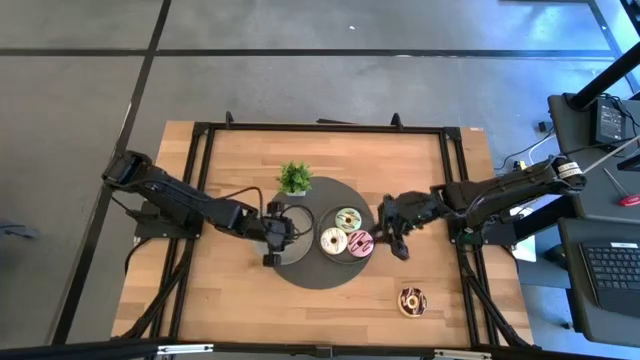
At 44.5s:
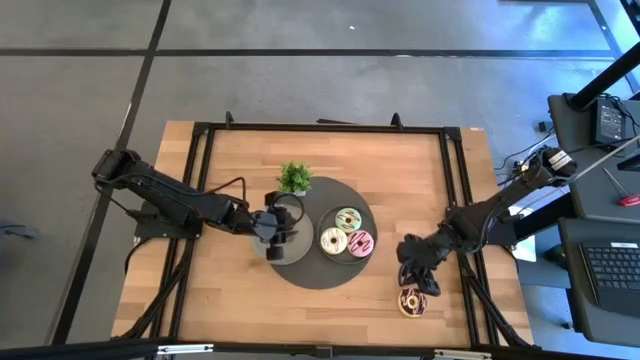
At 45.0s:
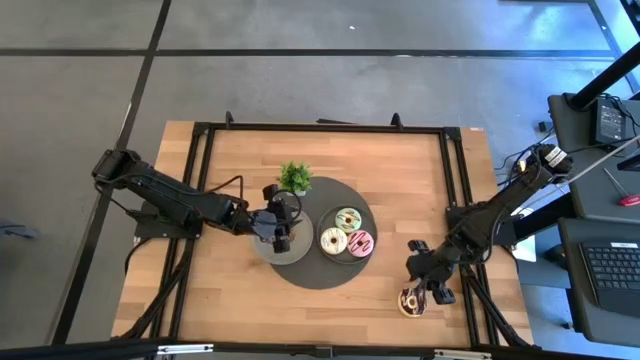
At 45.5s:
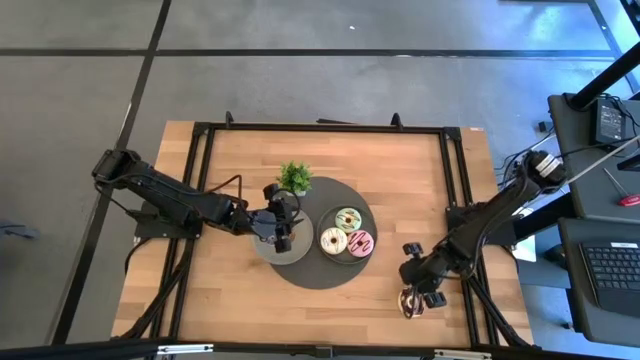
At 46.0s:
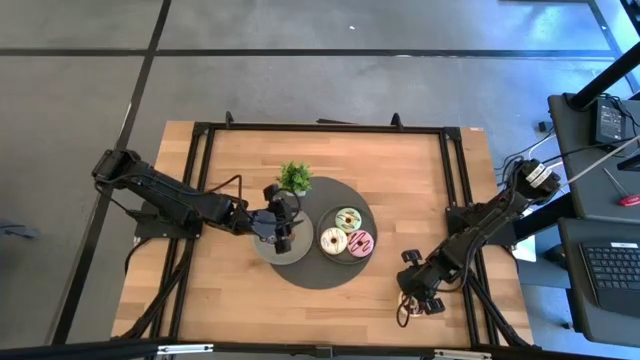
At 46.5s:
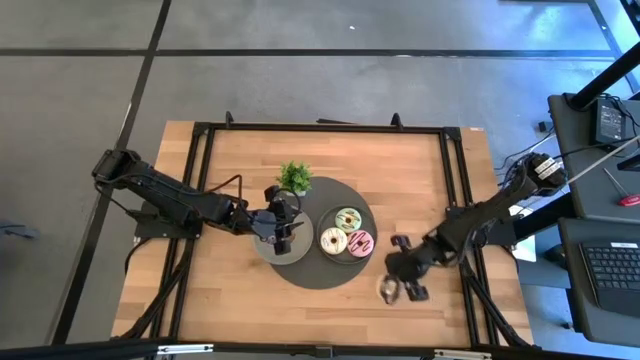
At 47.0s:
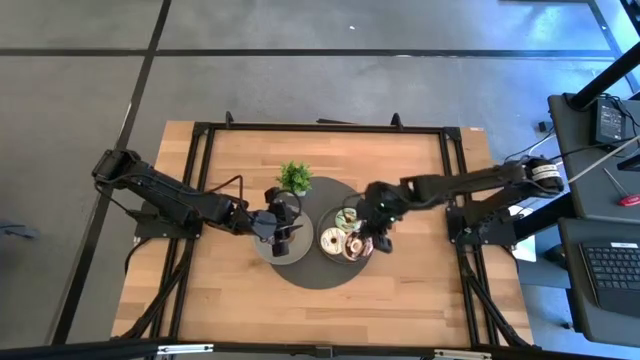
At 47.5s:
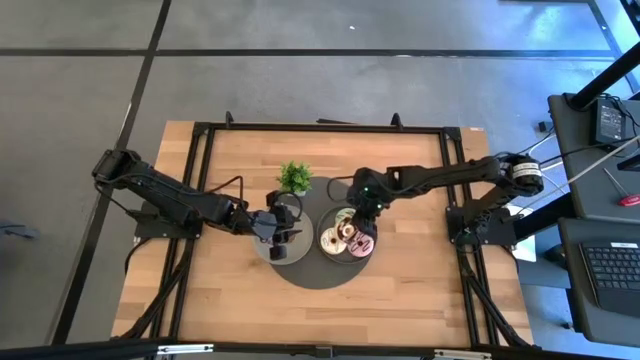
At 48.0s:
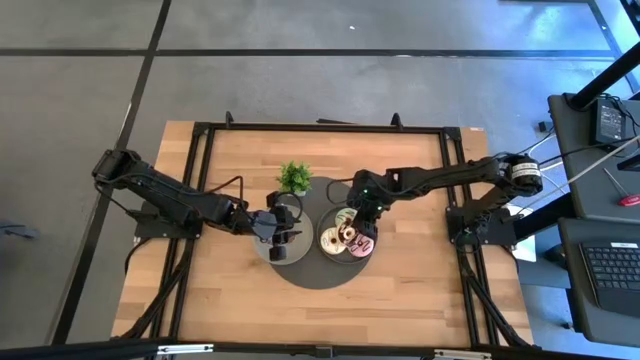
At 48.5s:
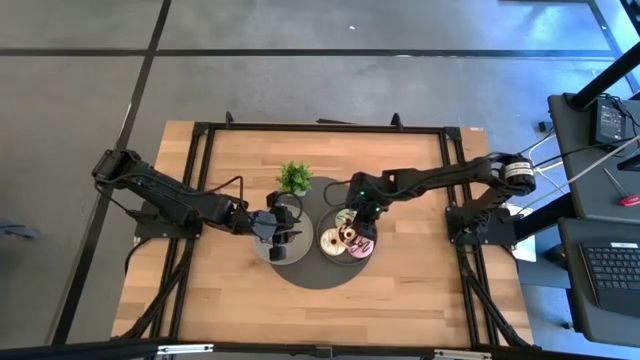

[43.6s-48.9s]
Task: Pick & Place donuts
Put the large black donut on the black plate

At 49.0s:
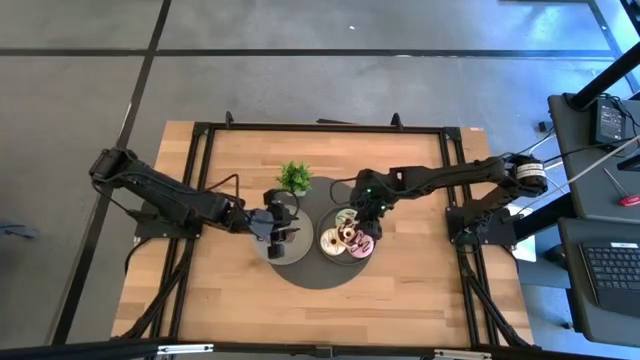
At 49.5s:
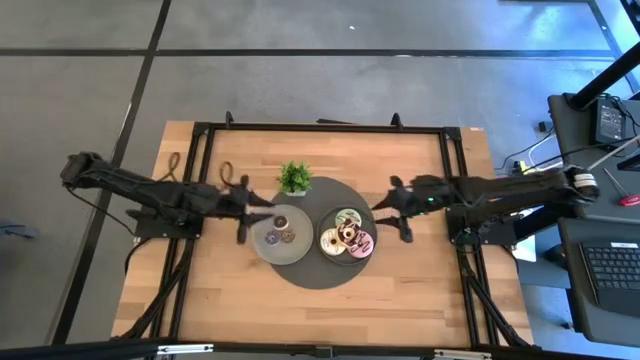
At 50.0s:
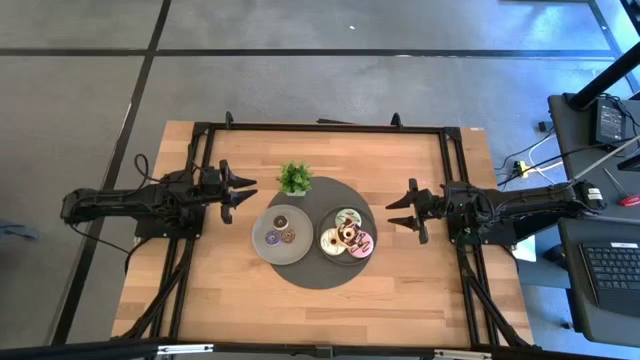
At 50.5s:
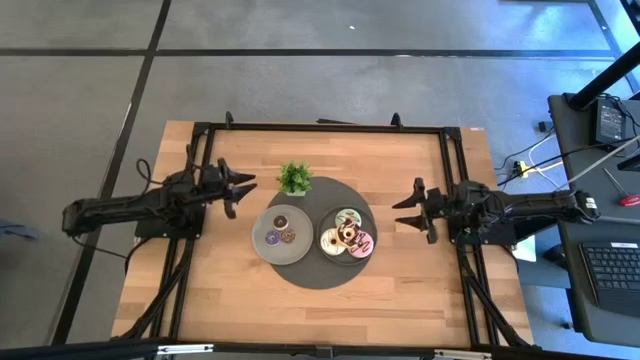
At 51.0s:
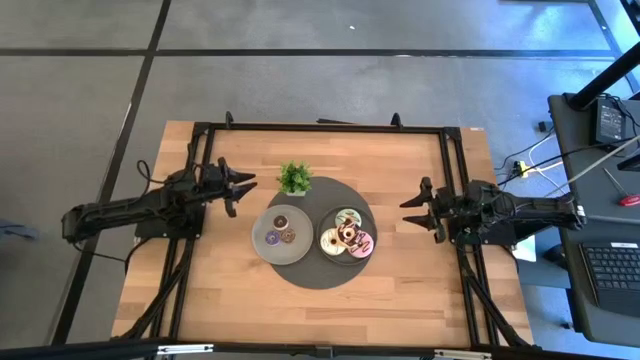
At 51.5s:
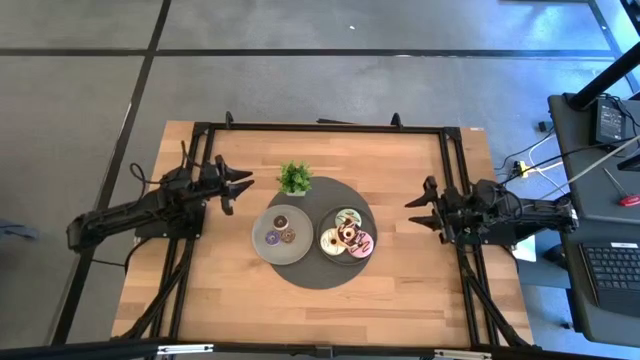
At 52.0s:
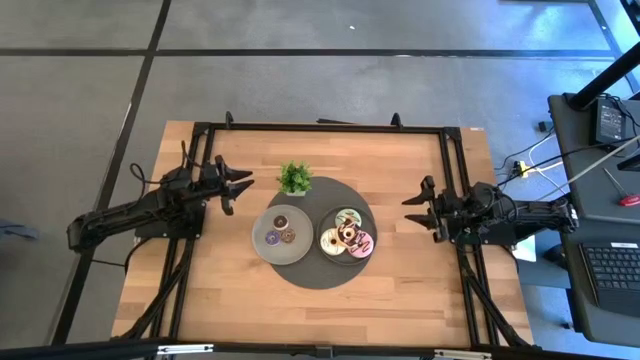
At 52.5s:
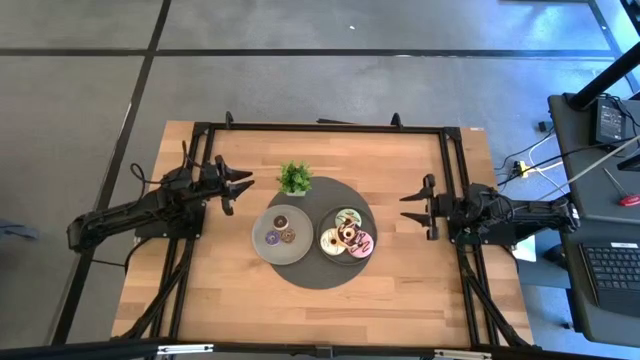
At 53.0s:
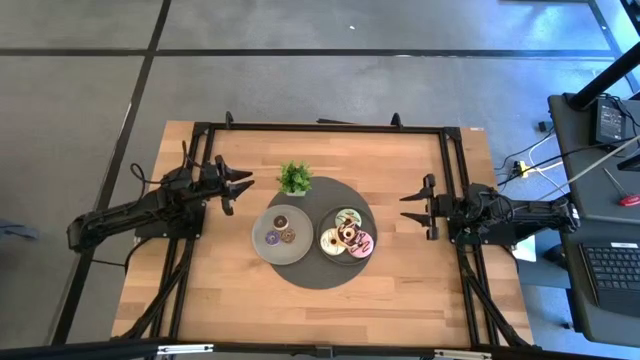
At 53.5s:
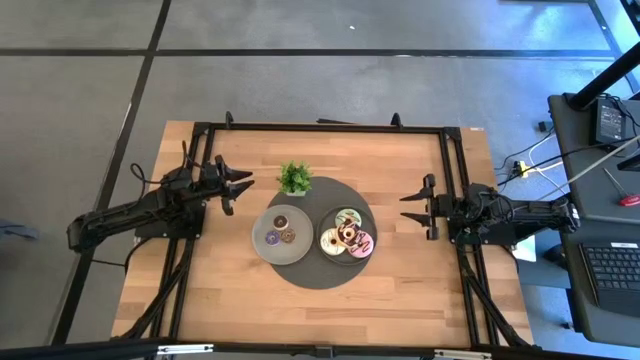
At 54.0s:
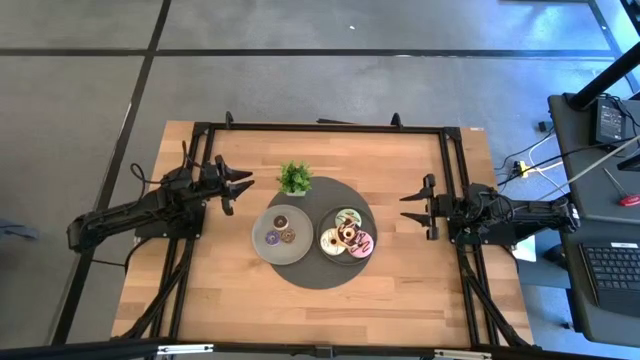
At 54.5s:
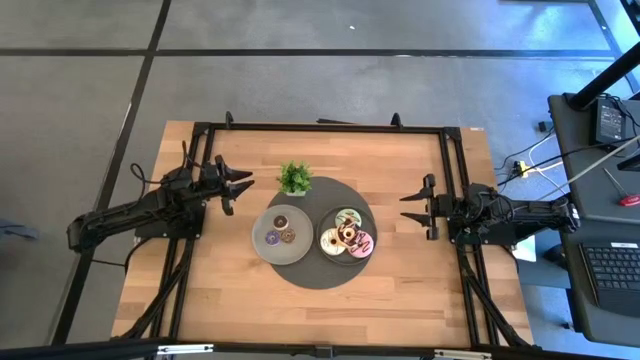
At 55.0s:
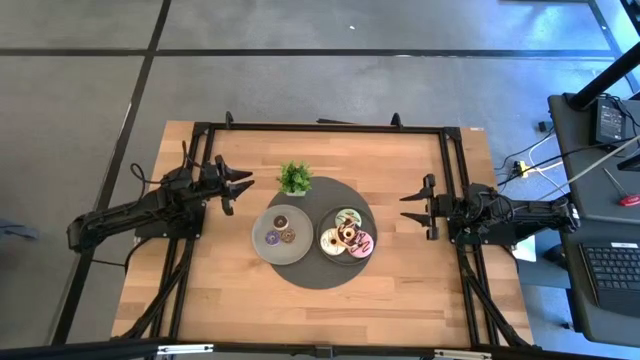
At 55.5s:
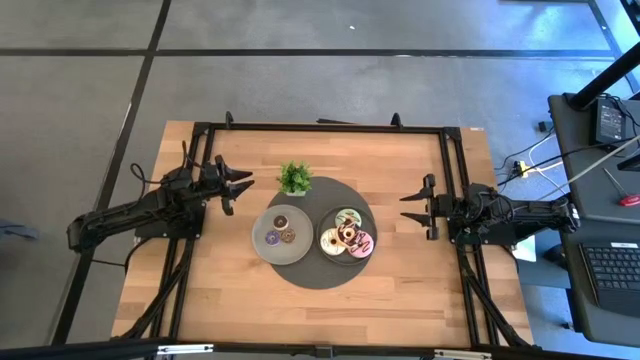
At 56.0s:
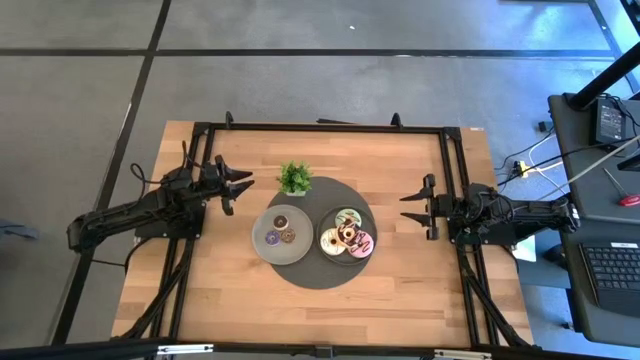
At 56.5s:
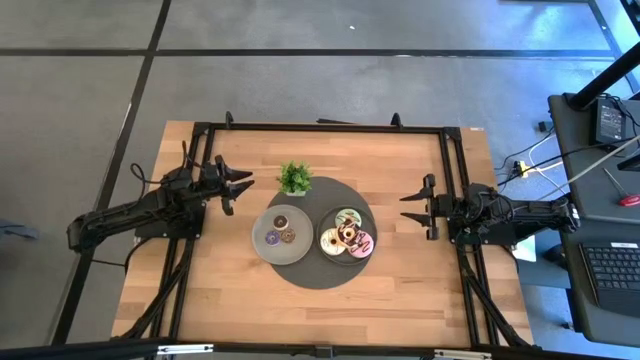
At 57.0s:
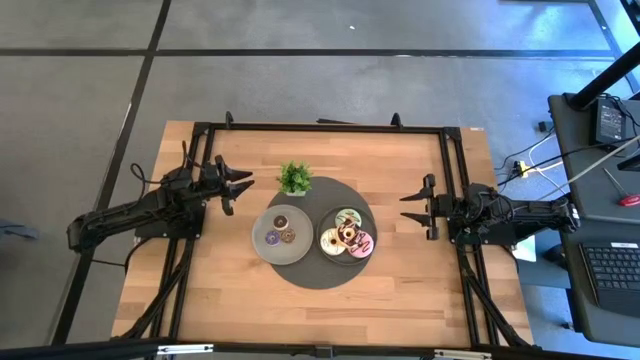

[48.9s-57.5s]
Return to Home Position

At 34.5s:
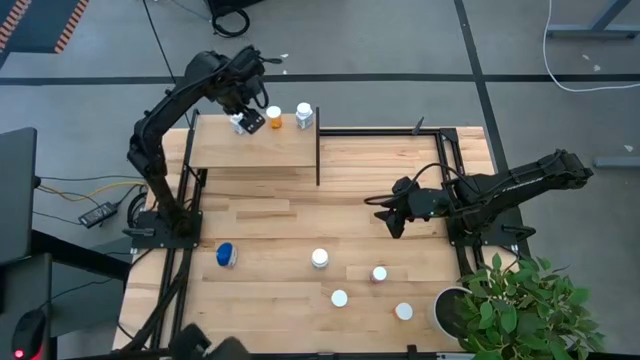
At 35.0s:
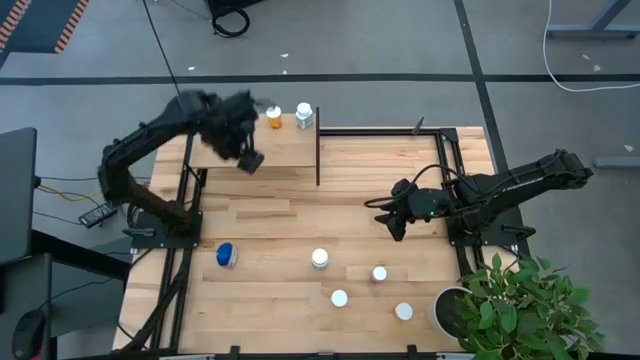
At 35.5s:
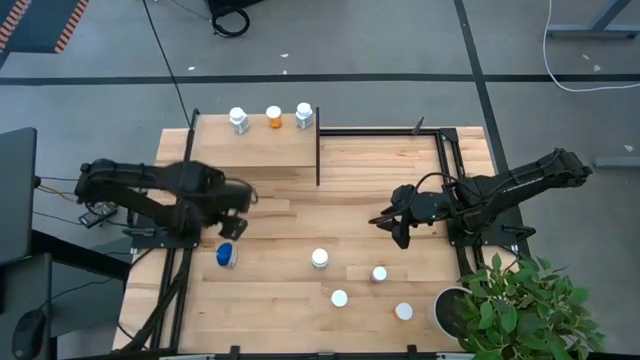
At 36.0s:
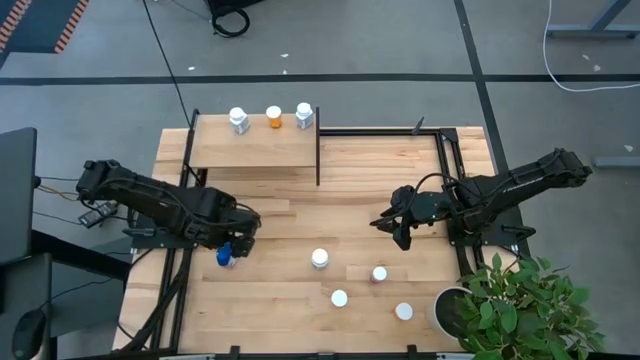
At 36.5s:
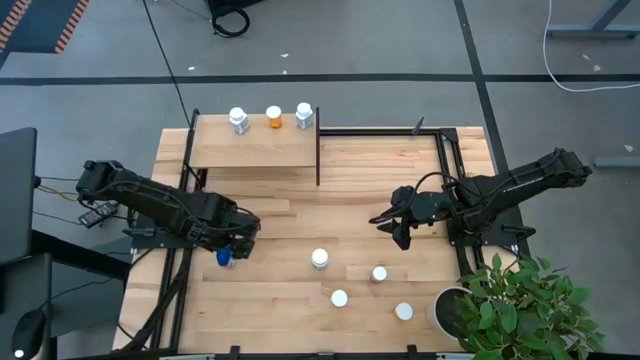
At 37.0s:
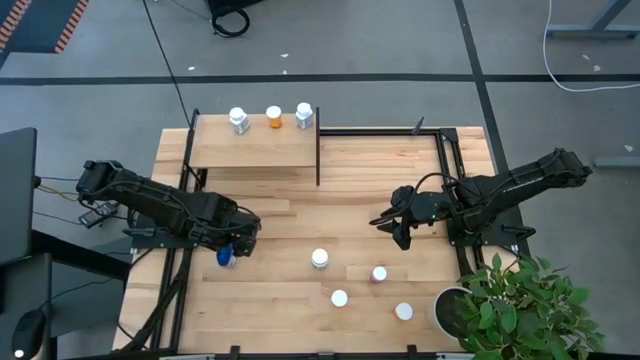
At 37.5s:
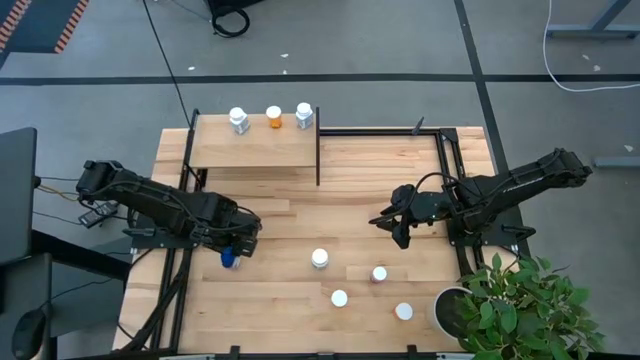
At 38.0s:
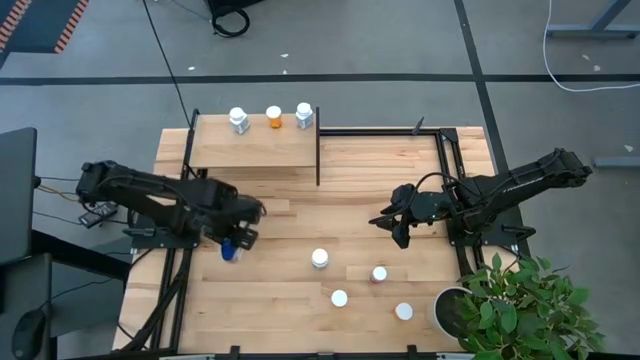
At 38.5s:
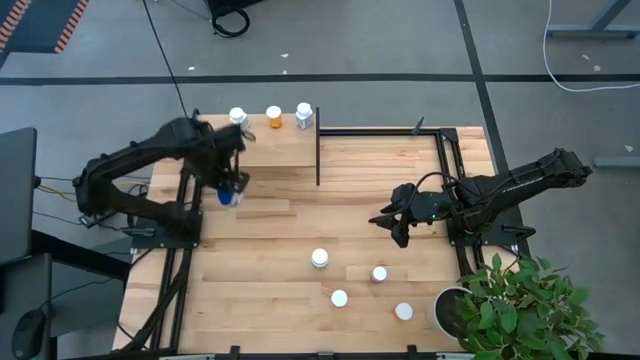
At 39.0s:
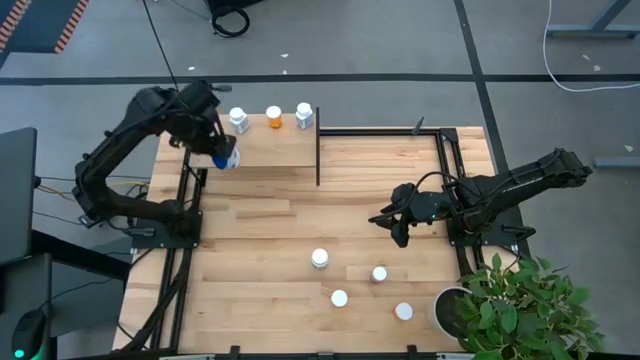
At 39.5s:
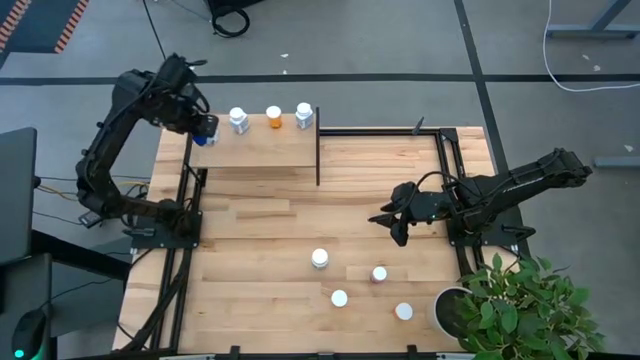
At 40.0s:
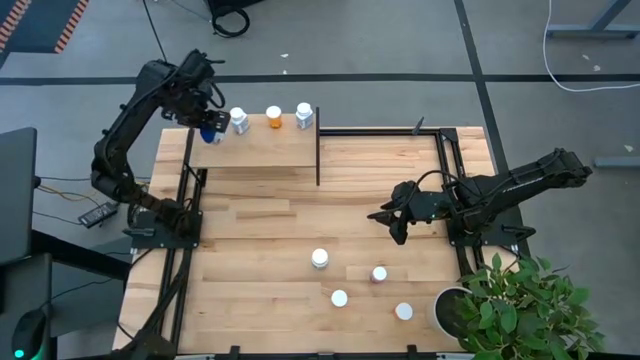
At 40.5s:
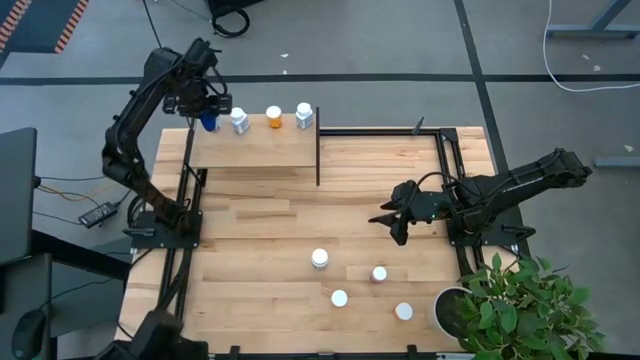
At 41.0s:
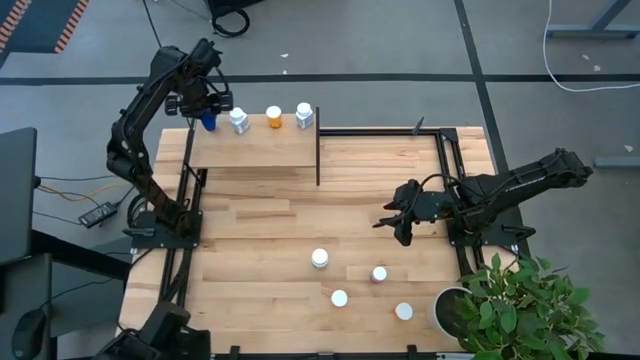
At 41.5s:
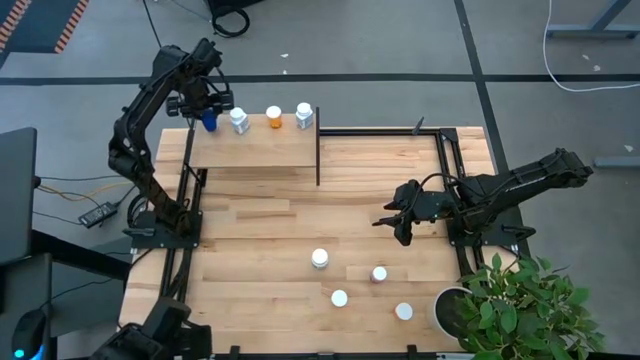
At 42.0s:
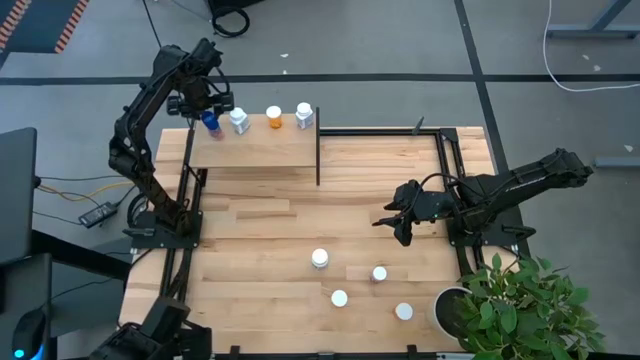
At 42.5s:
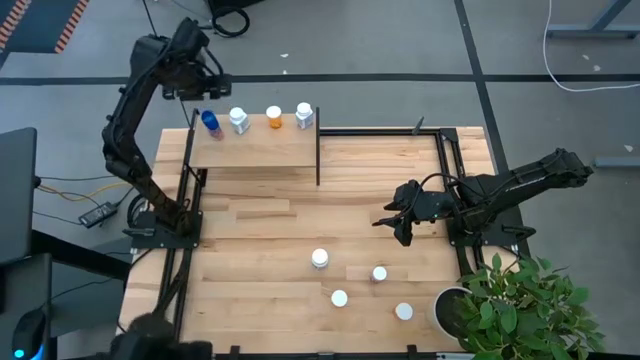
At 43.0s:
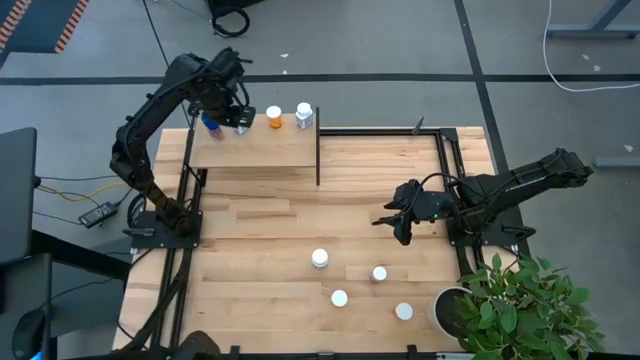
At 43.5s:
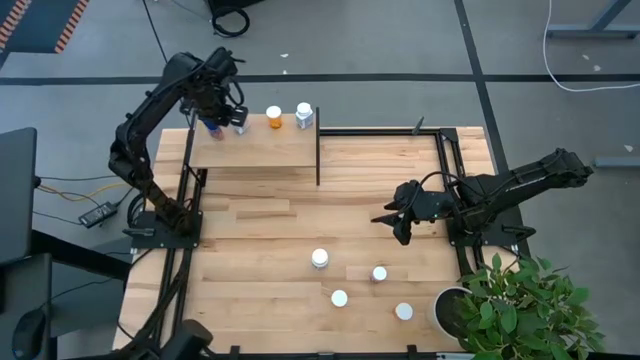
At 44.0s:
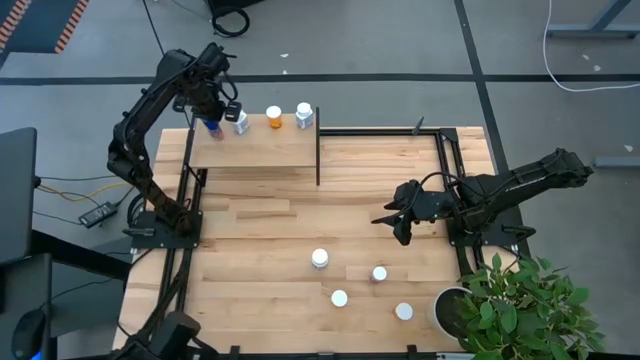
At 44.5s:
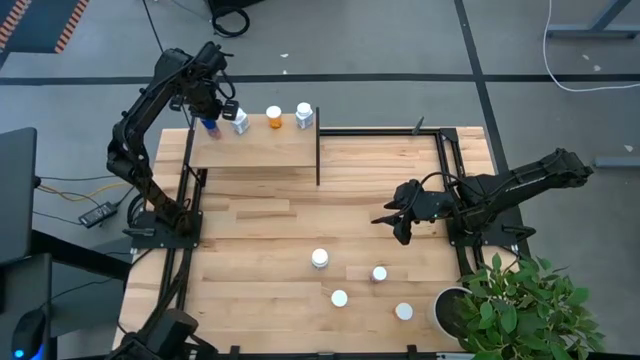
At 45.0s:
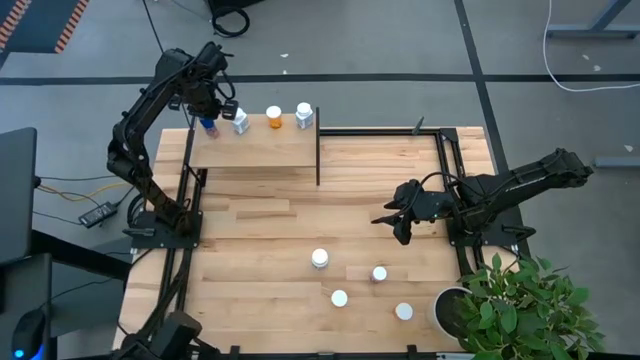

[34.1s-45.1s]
Task: Pick and place medicine bottles onto shelf by color
Put the blue pill bottle on the shelf
